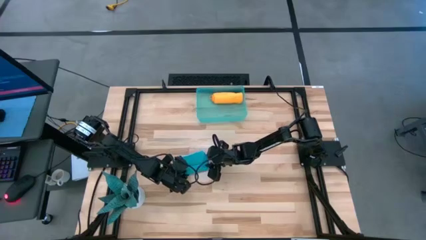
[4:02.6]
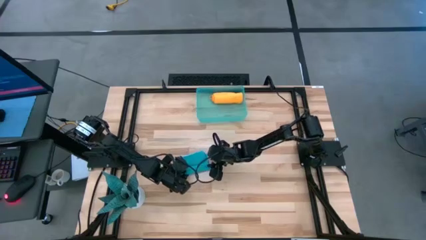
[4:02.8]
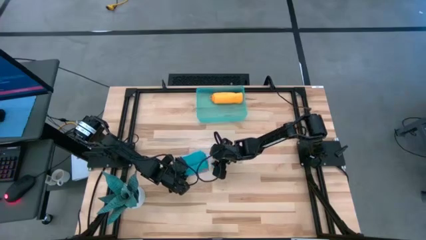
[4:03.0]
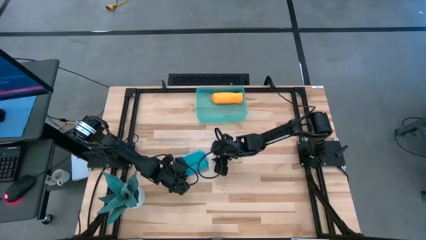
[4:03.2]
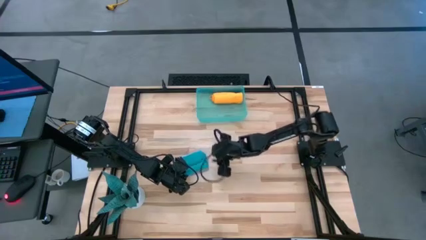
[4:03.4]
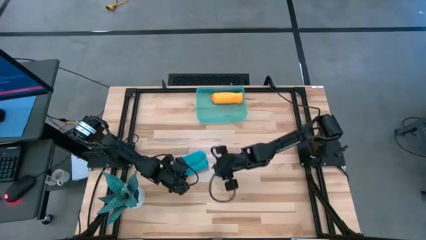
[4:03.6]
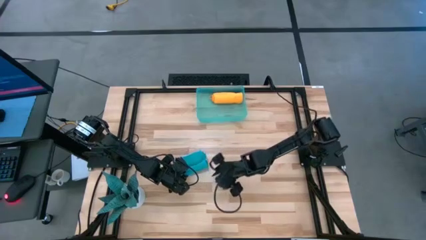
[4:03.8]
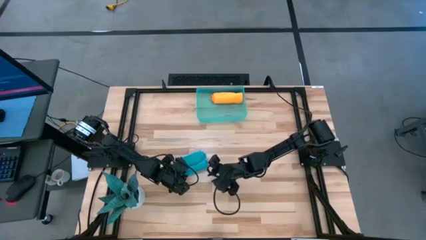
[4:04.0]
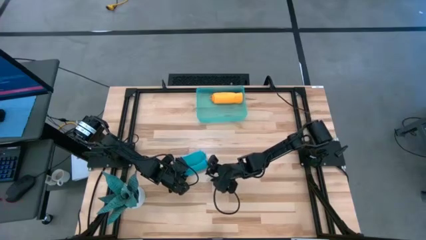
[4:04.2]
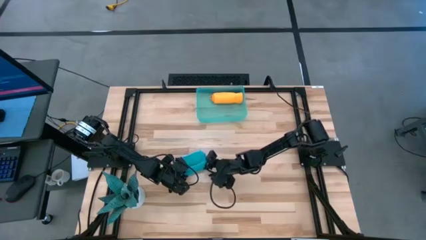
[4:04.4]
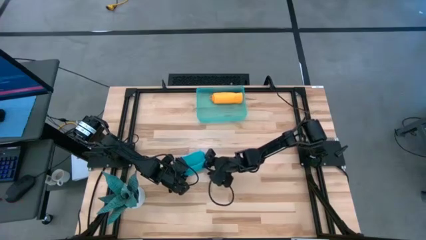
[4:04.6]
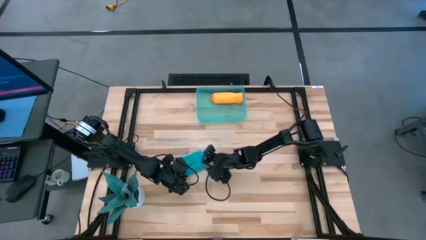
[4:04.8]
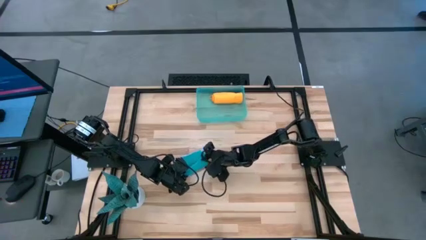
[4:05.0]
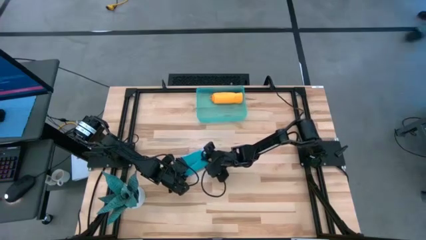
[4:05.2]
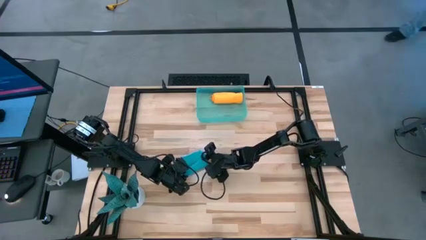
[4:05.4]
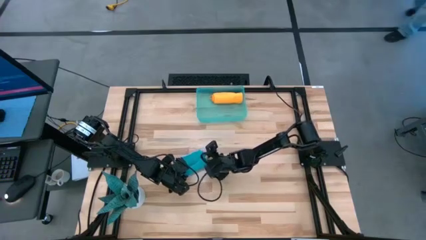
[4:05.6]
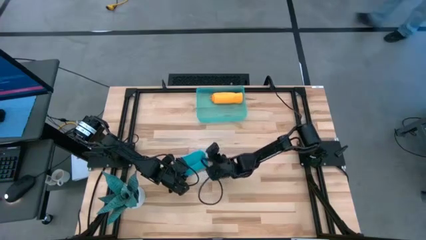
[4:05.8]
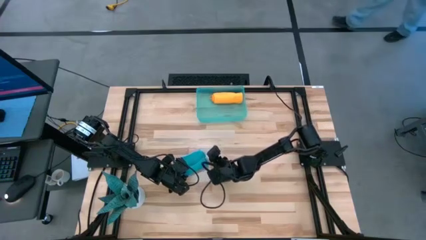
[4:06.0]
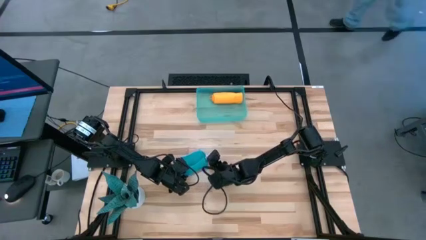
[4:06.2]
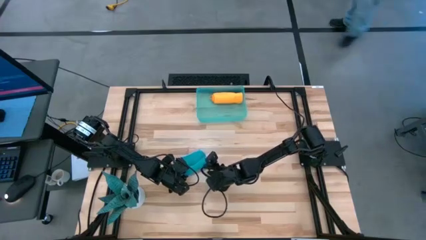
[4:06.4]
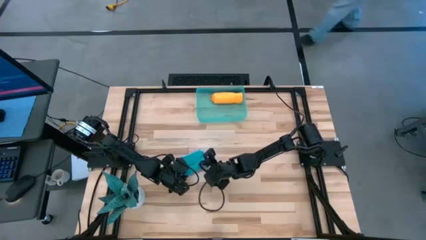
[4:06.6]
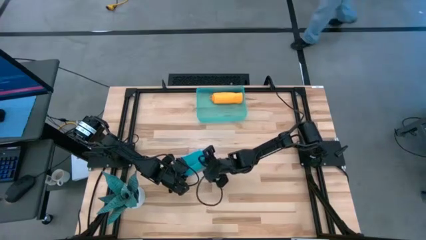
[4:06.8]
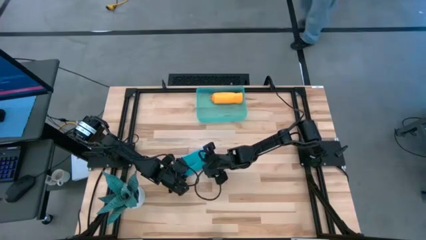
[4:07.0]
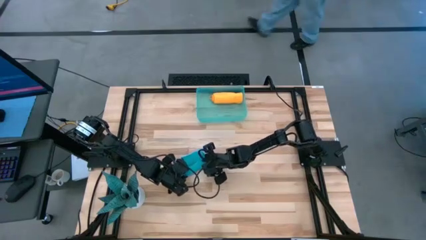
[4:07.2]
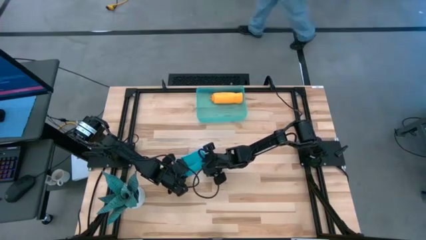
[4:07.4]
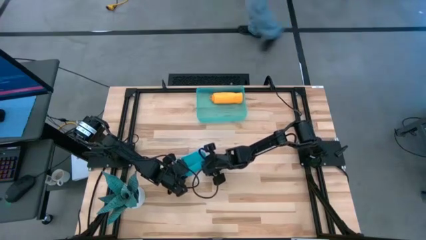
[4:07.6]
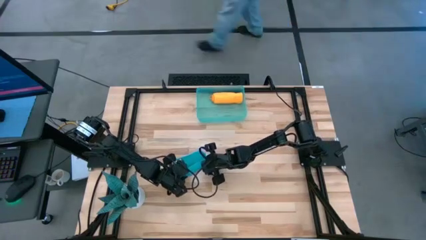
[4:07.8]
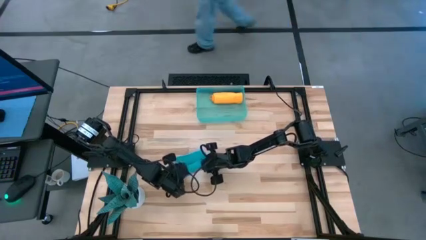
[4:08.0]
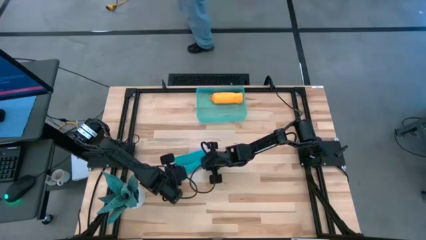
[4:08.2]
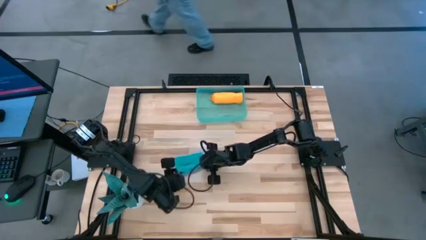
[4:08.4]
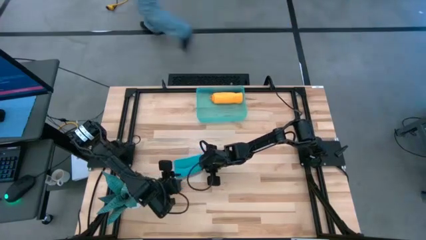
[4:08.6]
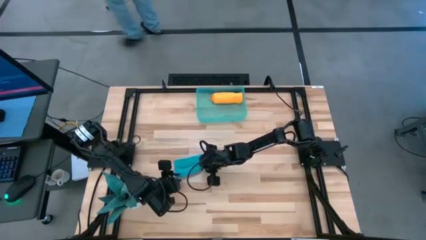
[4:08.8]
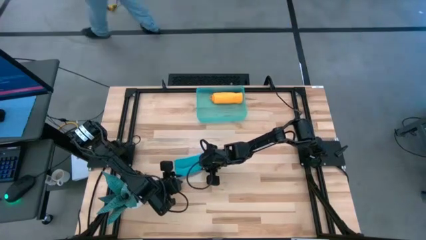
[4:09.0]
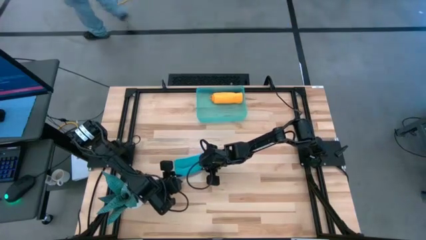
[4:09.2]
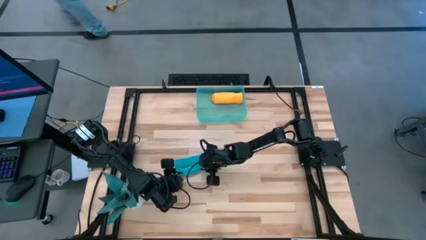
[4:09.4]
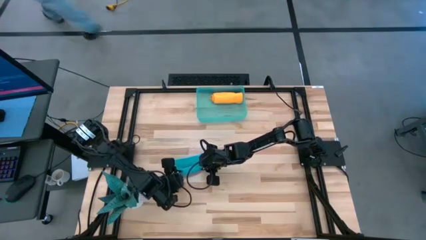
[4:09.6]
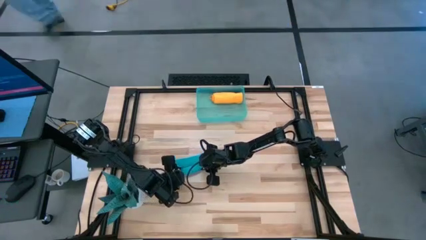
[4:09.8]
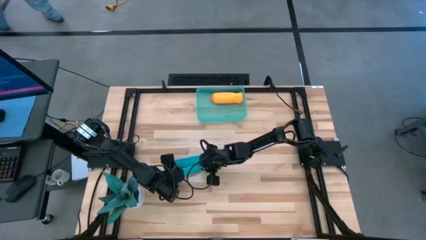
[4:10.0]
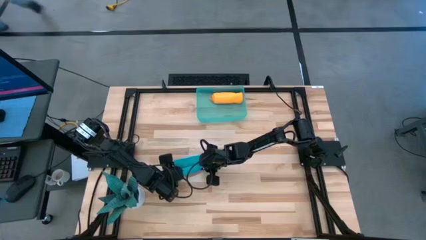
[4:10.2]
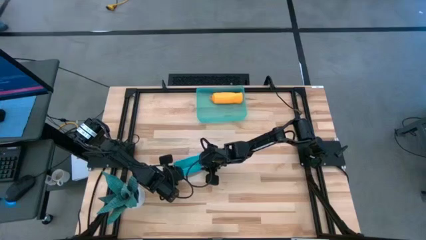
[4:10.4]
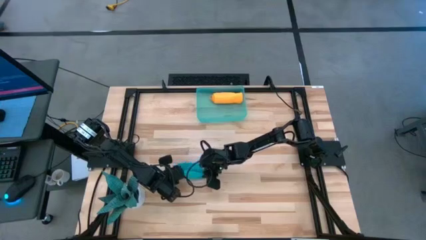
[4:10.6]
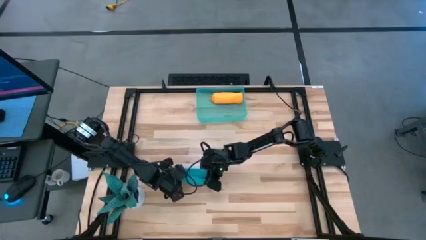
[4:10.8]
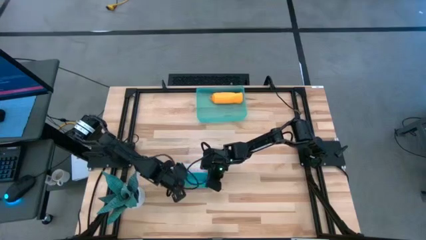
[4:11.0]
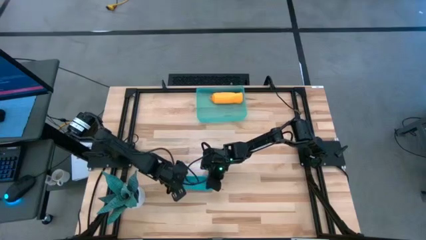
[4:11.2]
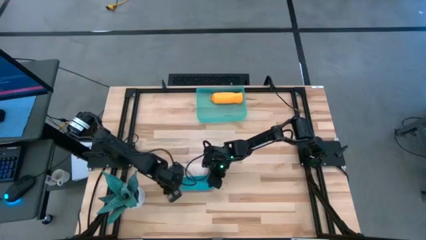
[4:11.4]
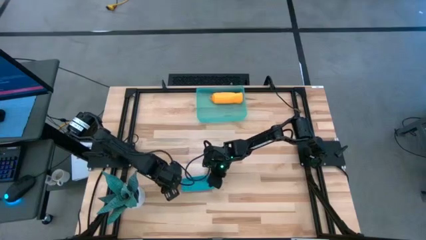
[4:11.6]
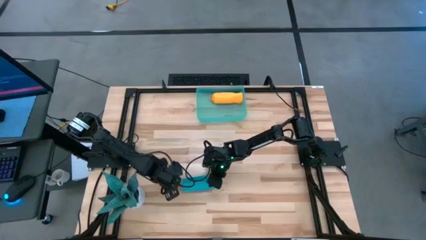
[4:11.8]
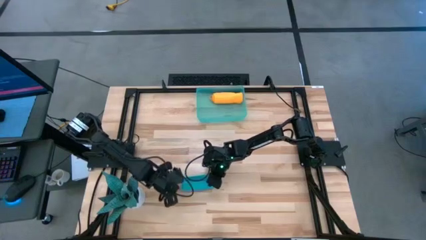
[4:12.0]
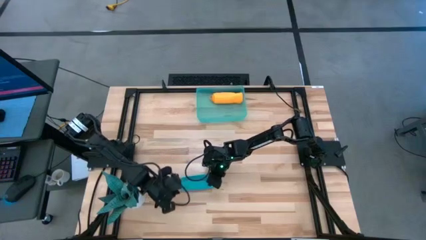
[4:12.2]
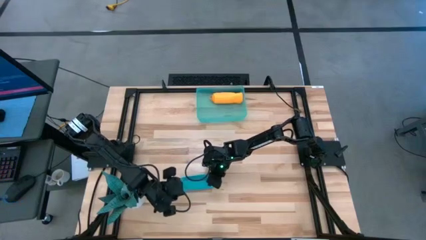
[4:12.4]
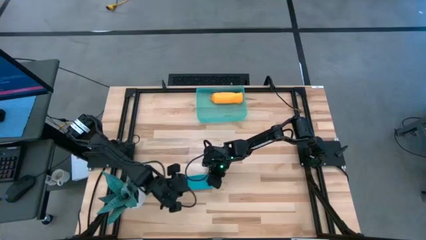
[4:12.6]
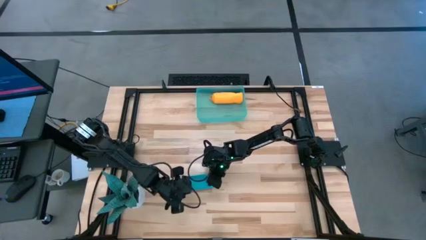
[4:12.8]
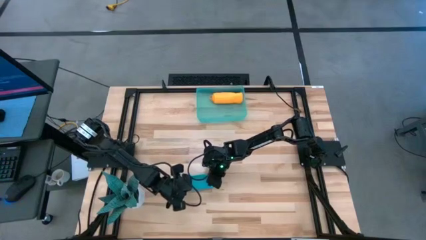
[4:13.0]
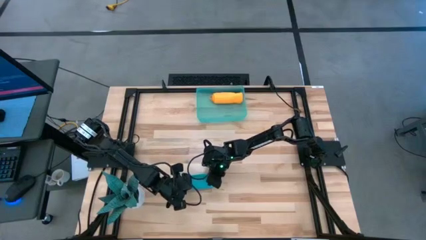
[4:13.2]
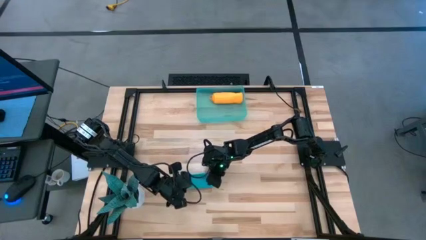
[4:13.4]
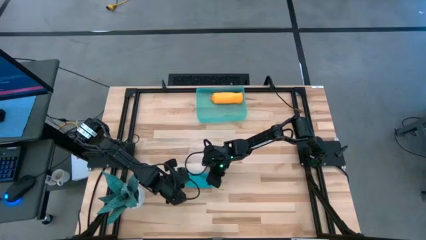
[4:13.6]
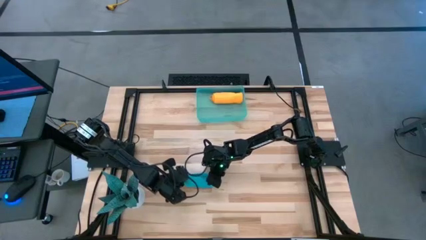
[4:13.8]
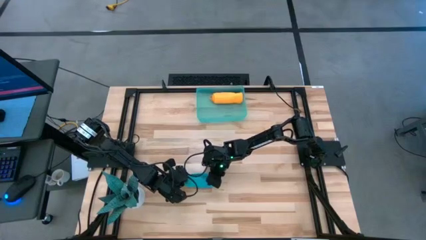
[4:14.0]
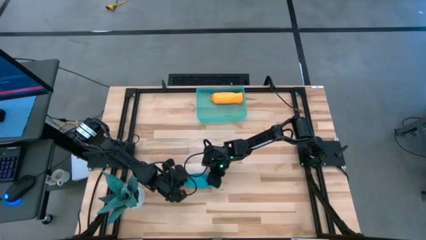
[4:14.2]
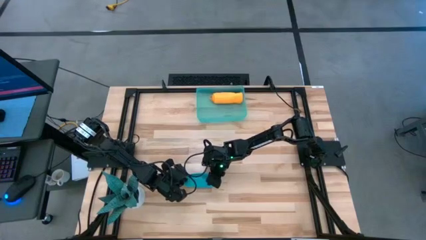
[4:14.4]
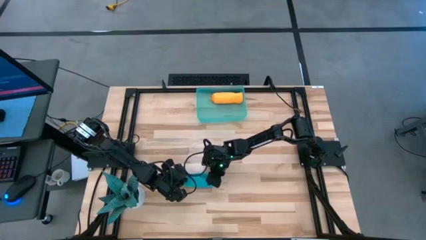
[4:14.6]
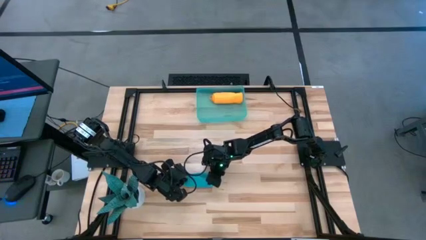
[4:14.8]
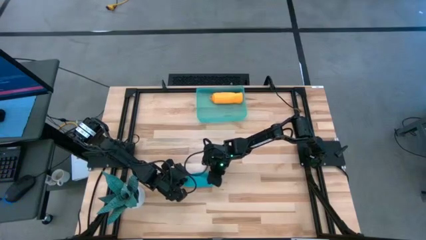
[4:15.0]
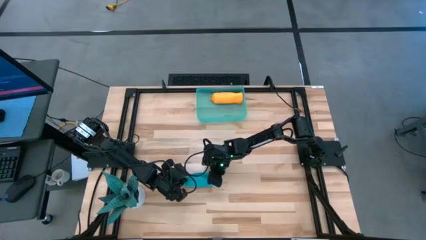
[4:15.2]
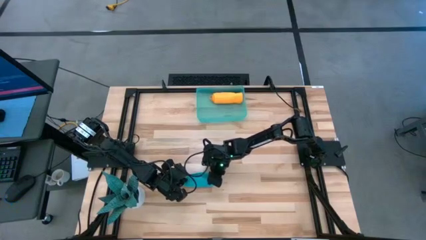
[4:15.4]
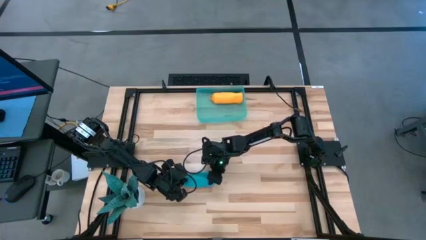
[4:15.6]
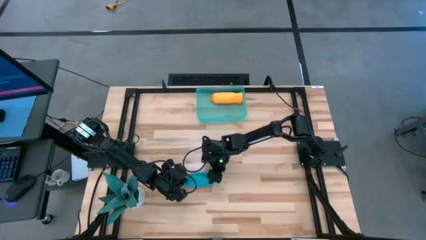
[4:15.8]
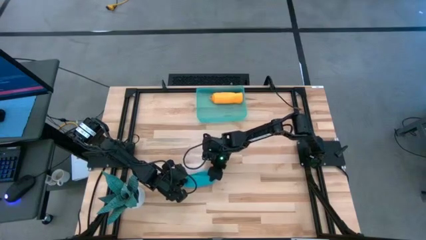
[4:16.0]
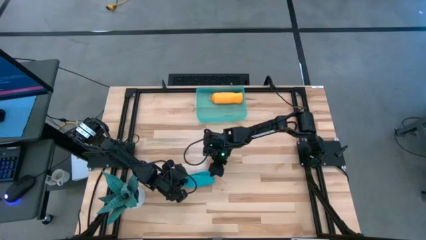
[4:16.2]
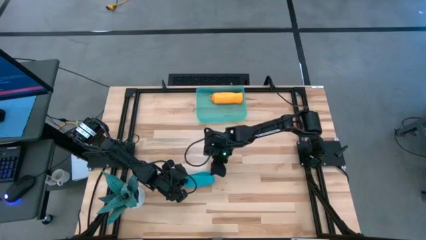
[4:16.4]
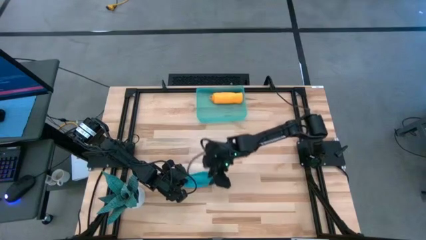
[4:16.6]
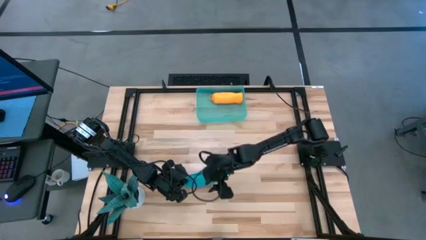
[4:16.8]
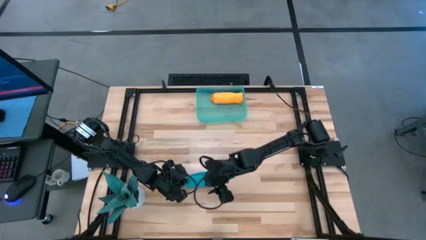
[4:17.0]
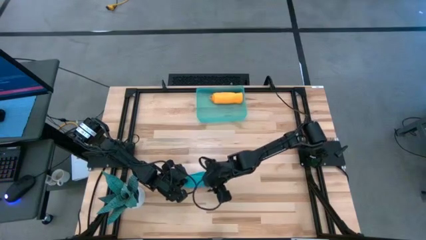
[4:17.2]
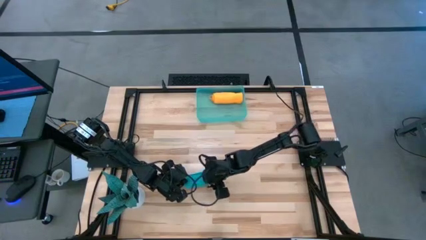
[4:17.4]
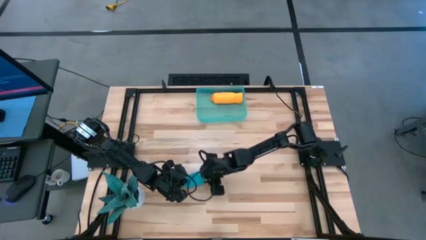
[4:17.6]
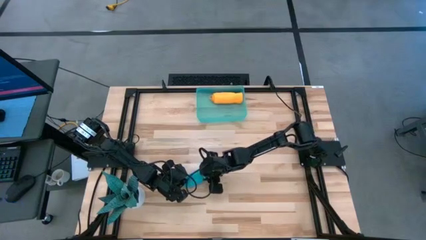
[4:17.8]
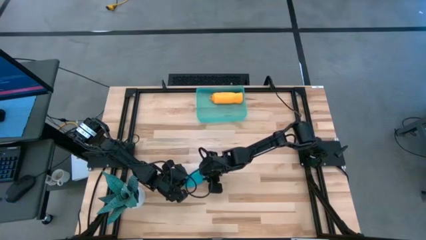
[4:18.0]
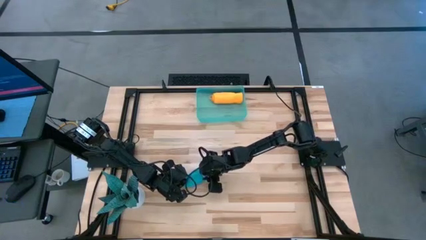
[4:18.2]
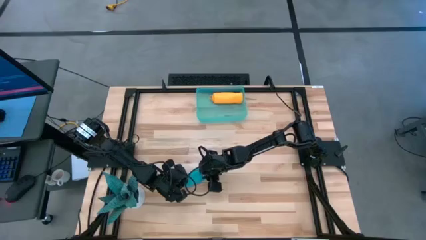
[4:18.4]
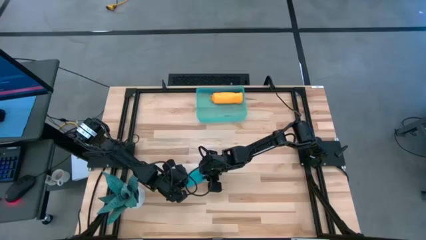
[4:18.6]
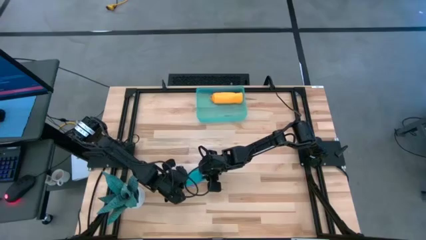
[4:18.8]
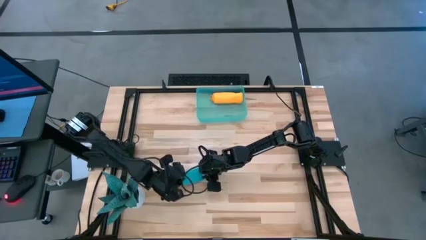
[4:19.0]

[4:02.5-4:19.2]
Task: Roll microfiber towels into tight, uniform cylinder then place into a basket
Roll the blue microfiber cloth on the table
